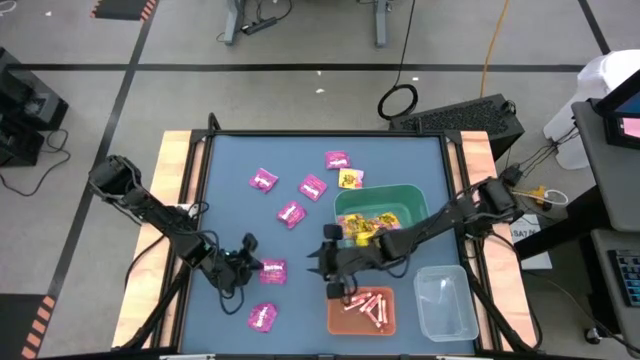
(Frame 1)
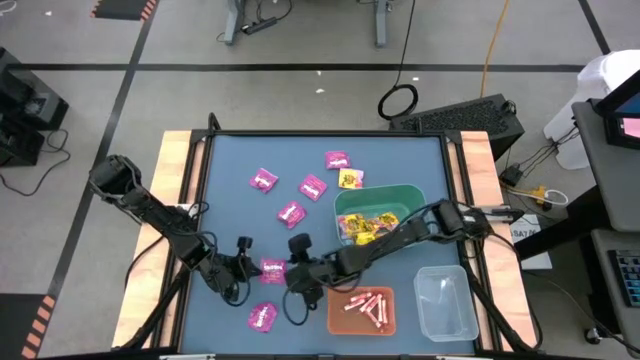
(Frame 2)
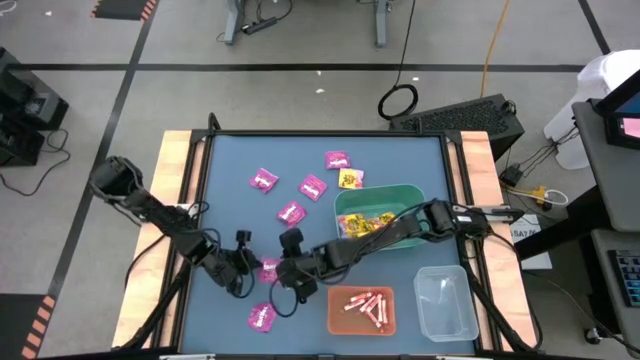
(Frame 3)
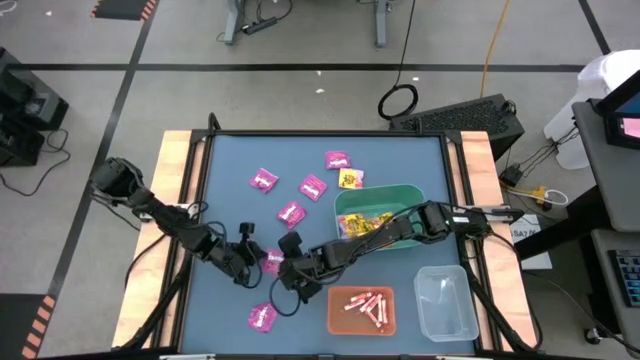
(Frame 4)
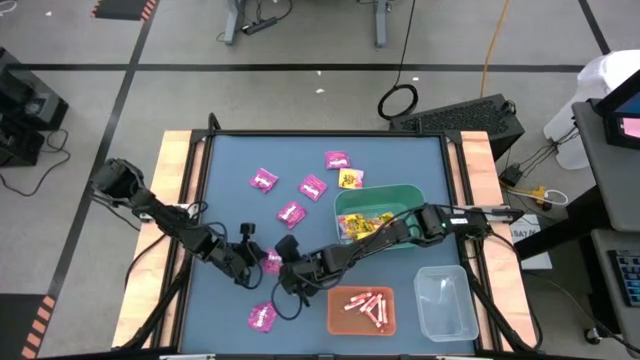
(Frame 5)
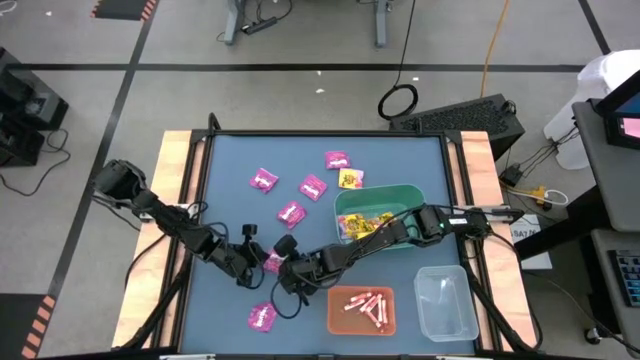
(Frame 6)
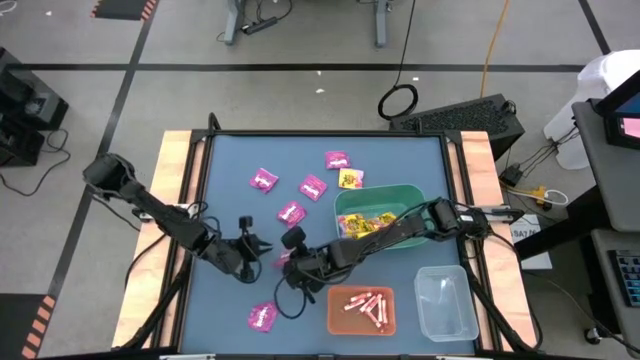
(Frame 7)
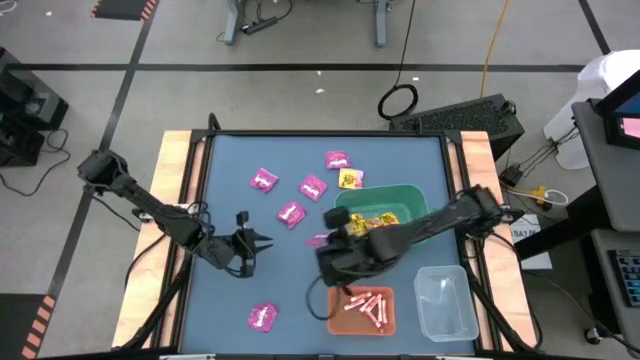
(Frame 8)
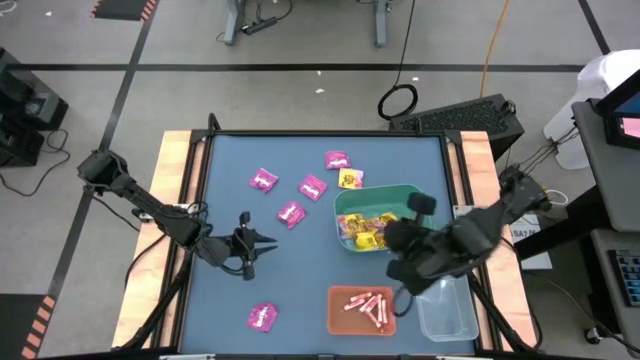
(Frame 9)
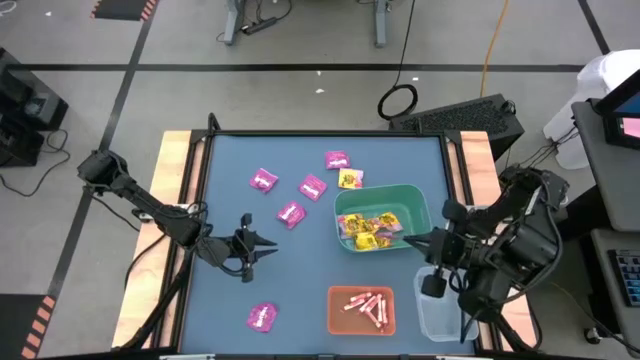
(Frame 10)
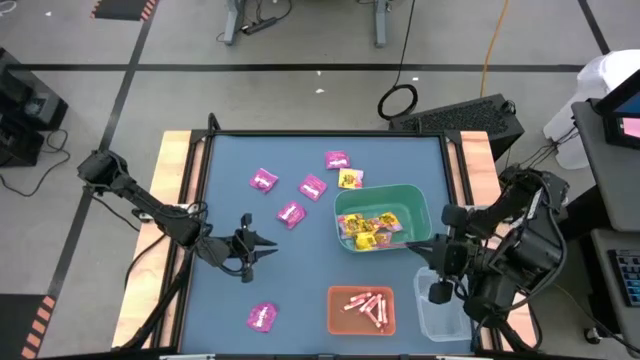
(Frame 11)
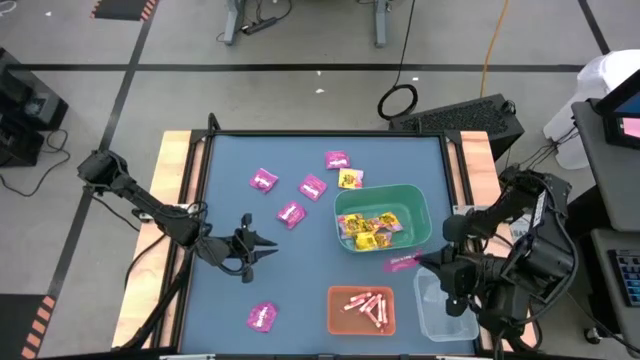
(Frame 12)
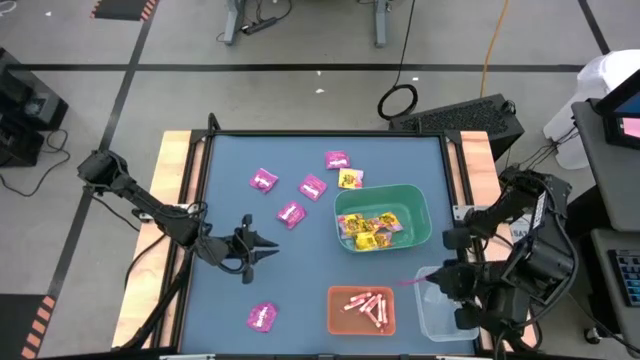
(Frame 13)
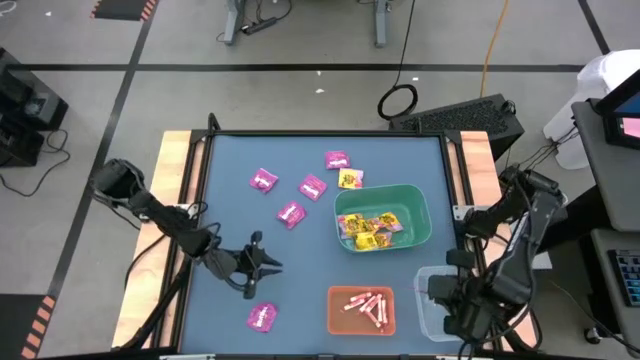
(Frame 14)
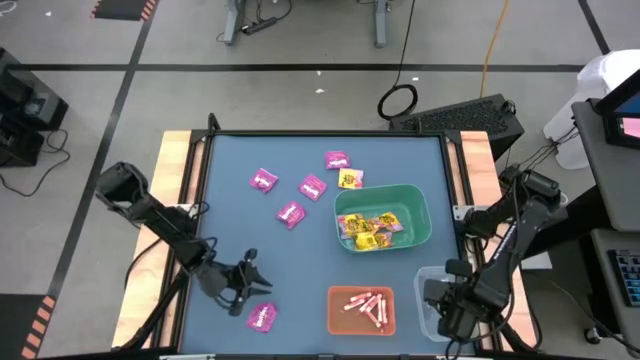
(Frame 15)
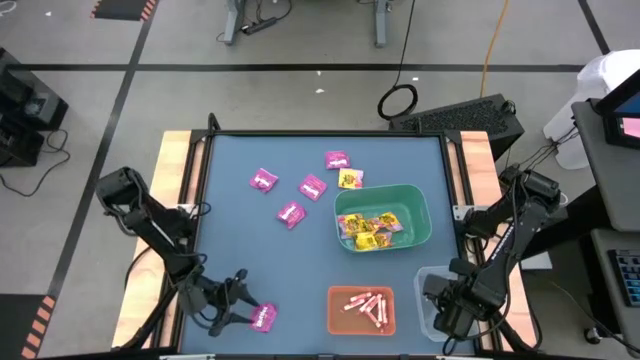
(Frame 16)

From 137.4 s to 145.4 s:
Task: Sort candy
Put the purple candy pack into the transparent bin

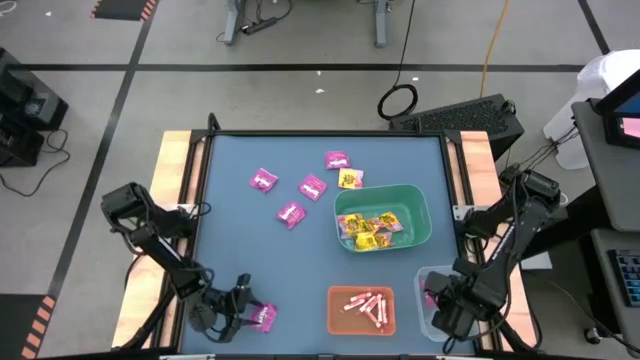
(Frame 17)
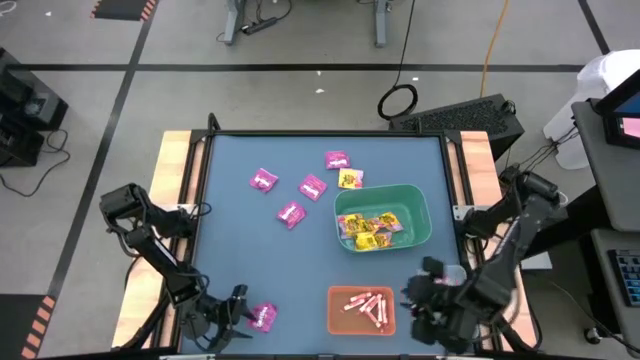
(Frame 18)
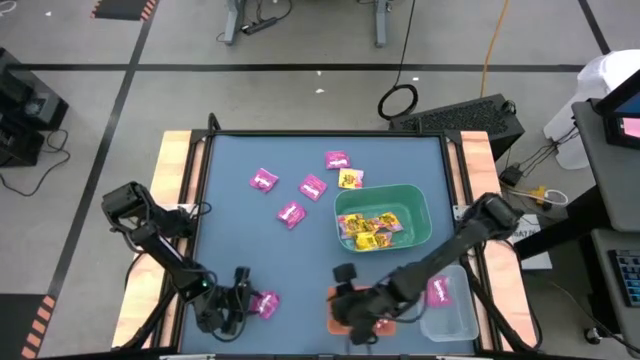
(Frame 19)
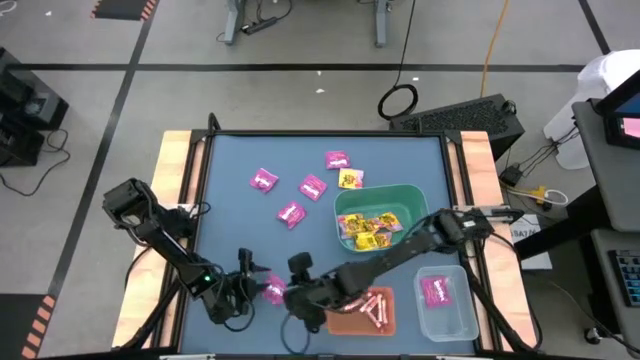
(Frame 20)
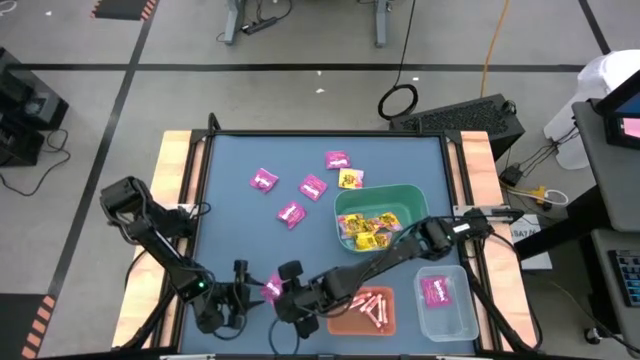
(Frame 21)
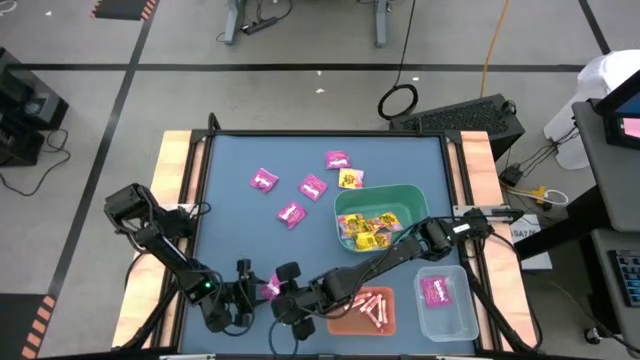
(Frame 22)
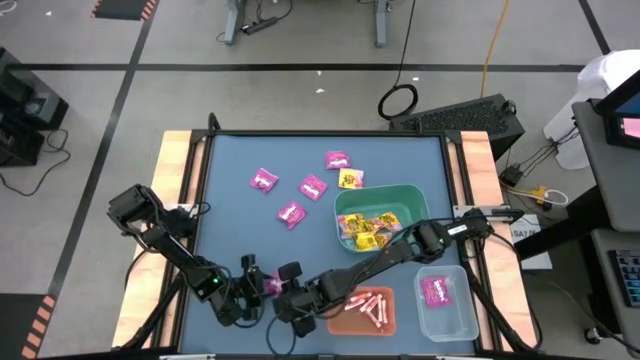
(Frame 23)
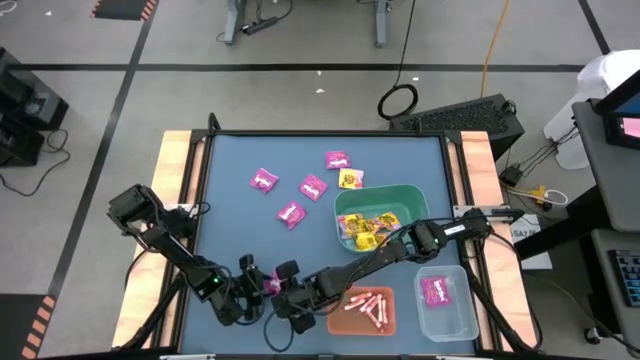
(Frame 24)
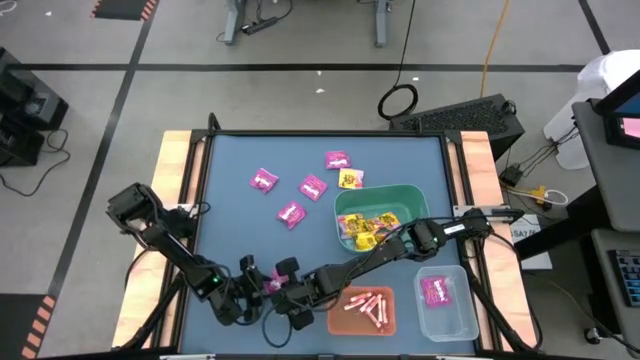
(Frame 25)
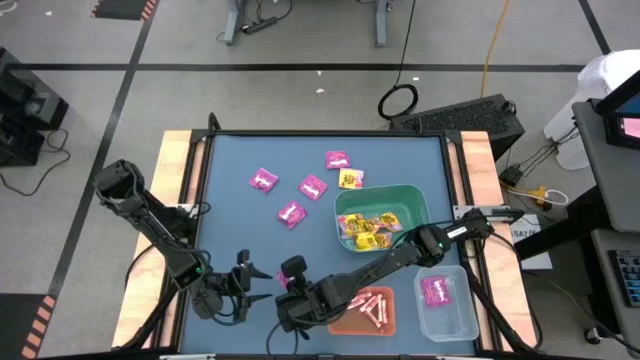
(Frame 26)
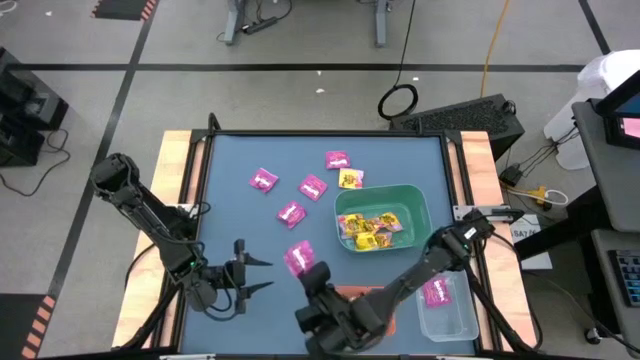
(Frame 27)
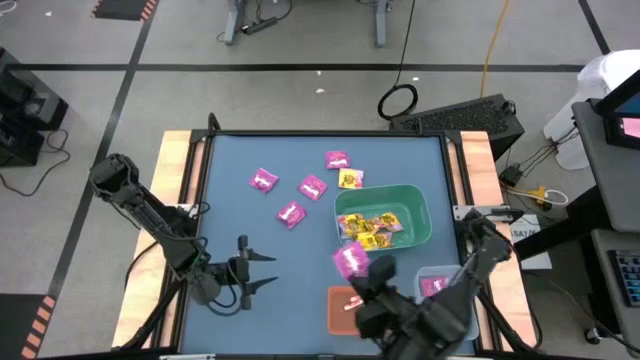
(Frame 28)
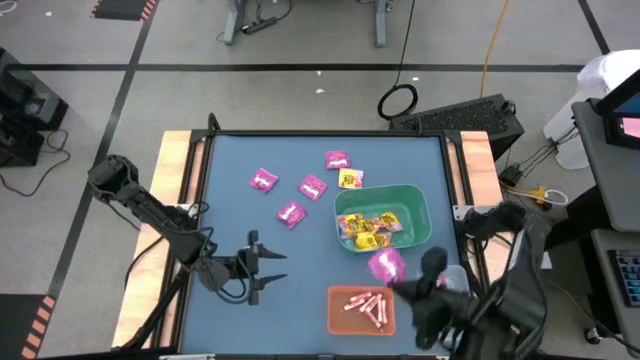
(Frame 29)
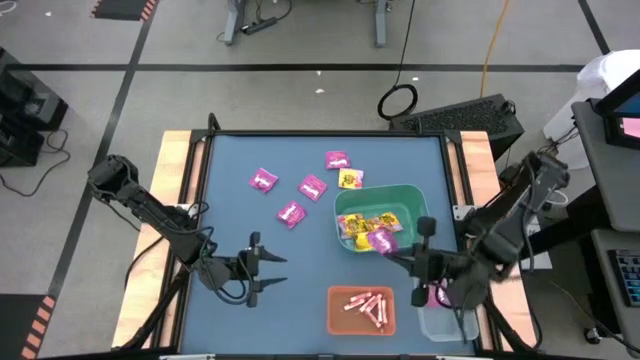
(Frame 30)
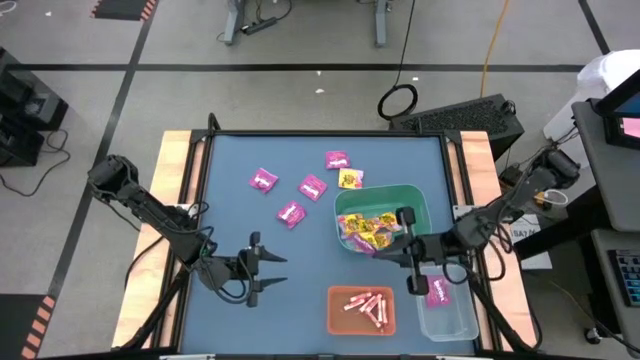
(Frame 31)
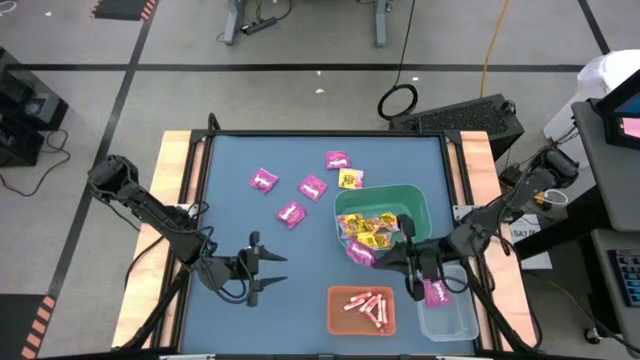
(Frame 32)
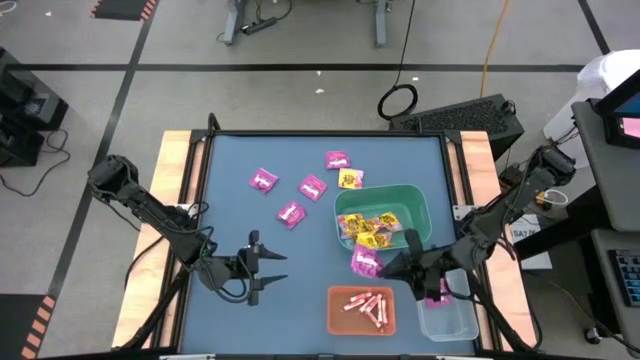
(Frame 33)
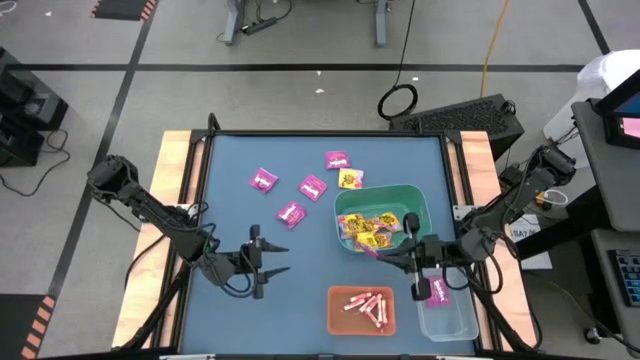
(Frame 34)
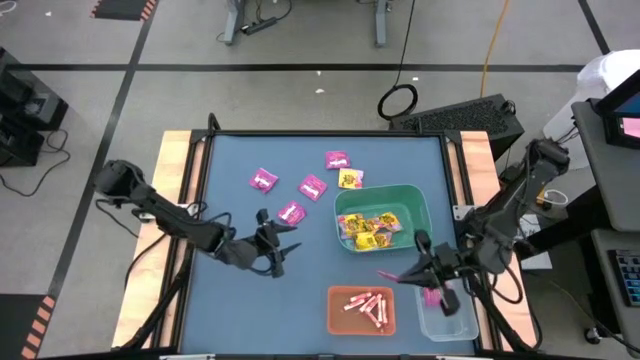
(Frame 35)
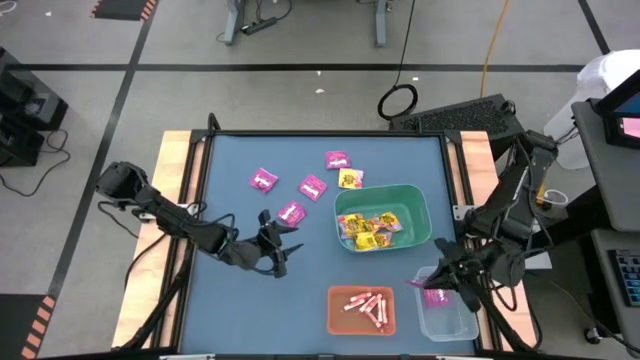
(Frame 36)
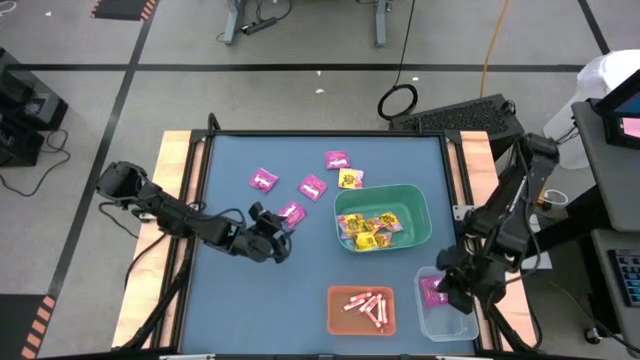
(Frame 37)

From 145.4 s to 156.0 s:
Put the purple candy pack into the transparent bin

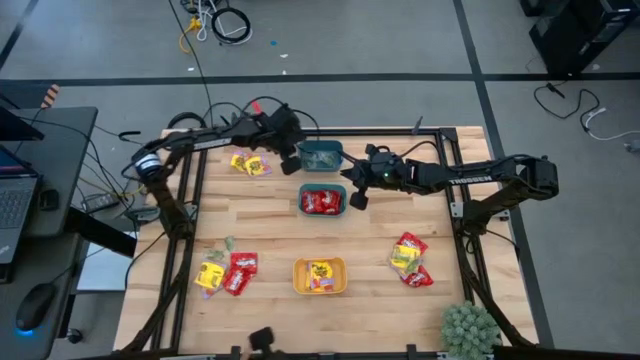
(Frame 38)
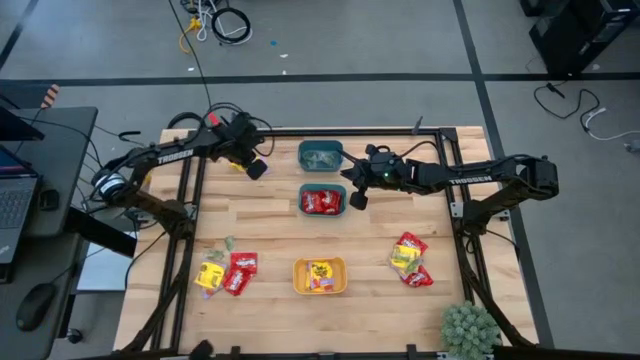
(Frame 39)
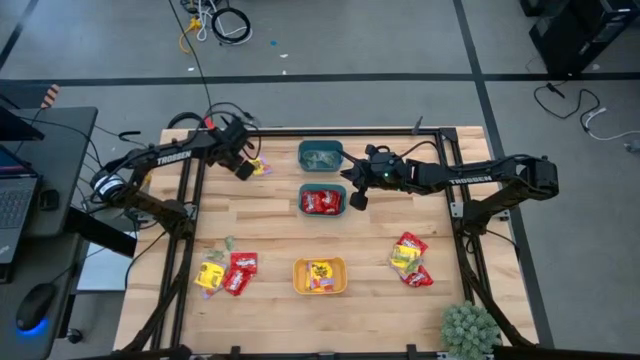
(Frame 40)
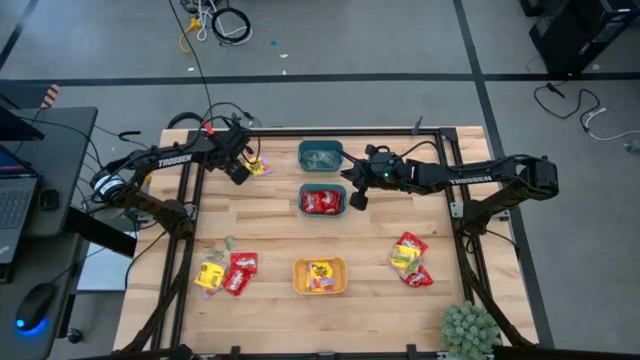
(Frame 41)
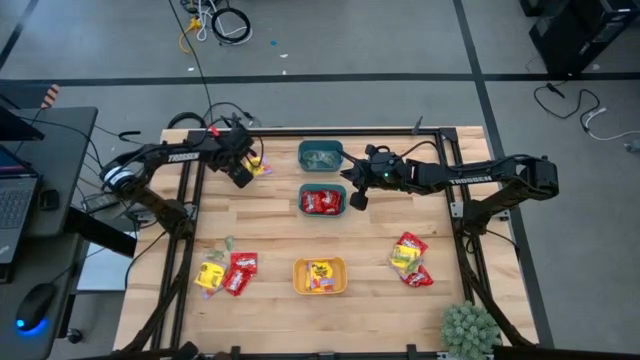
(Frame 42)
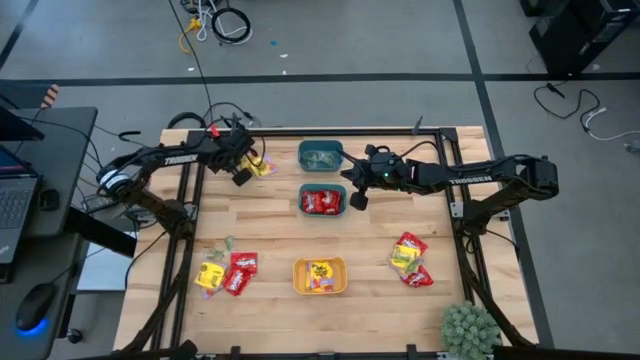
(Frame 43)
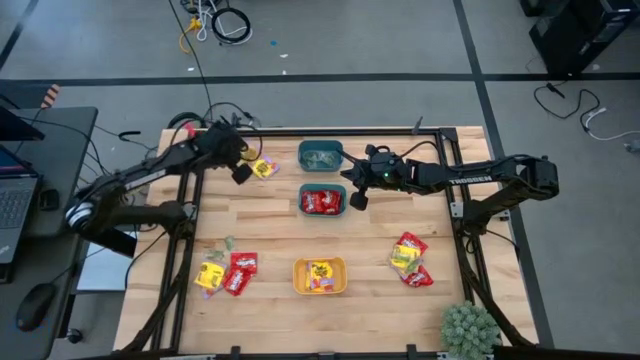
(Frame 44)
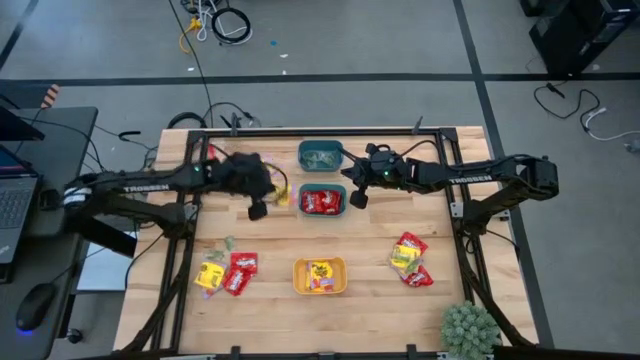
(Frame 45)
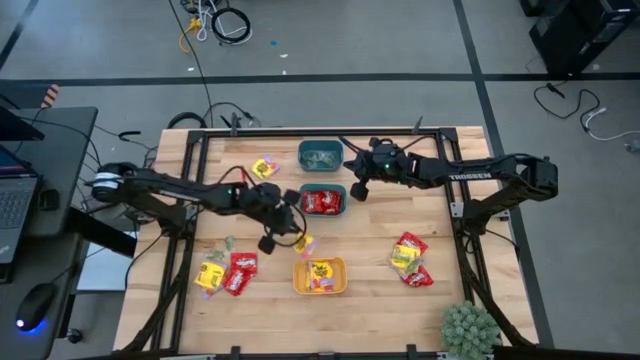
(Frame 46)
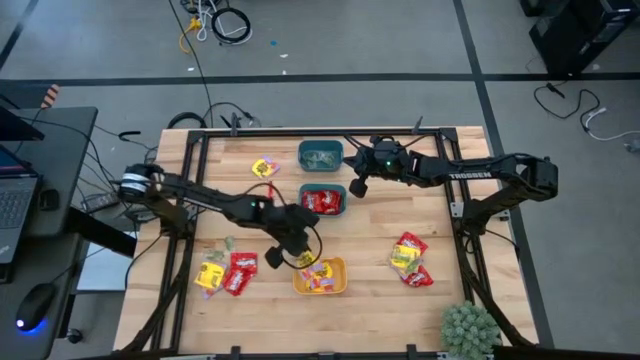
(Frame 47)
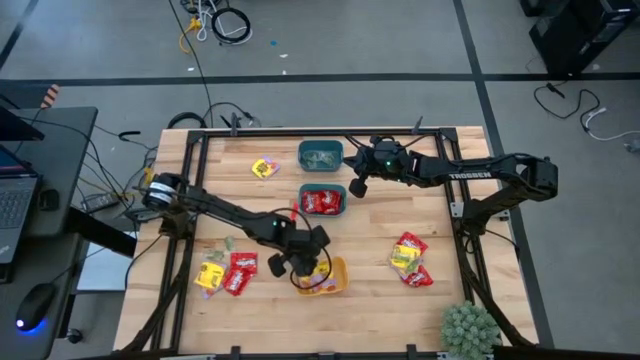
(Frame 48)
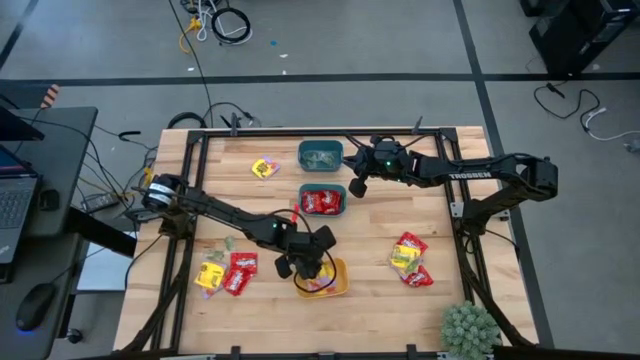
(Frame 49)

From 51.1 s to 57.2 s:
Task: Sort candy
Put the yellow candy into the yellow bin
